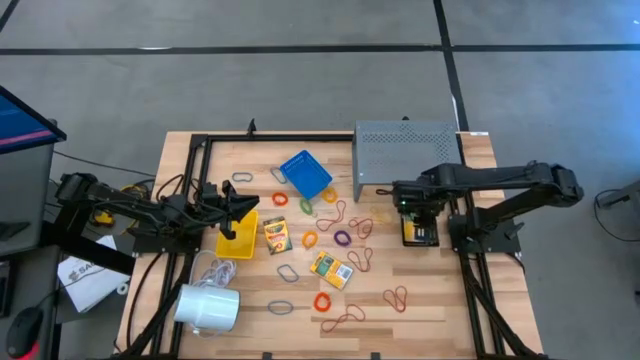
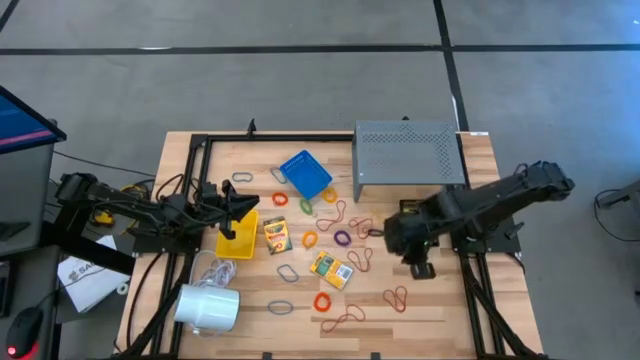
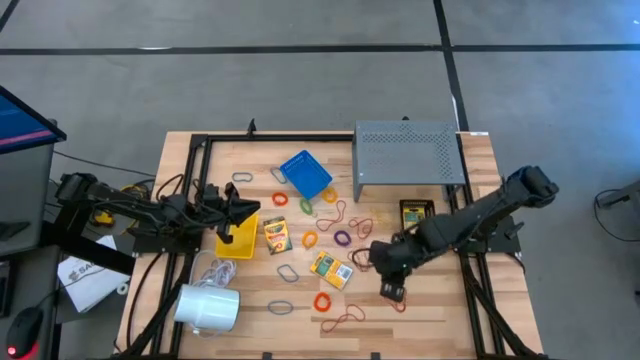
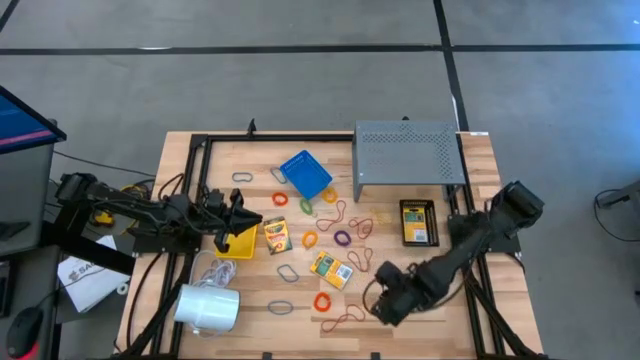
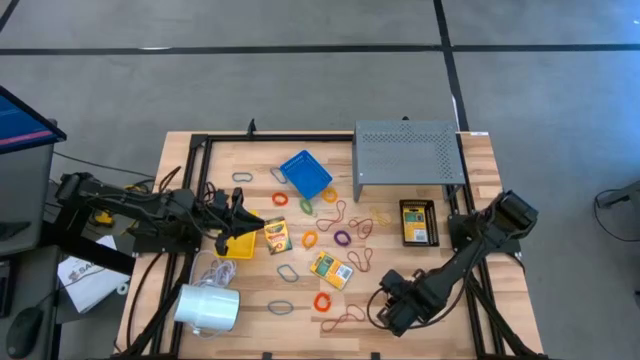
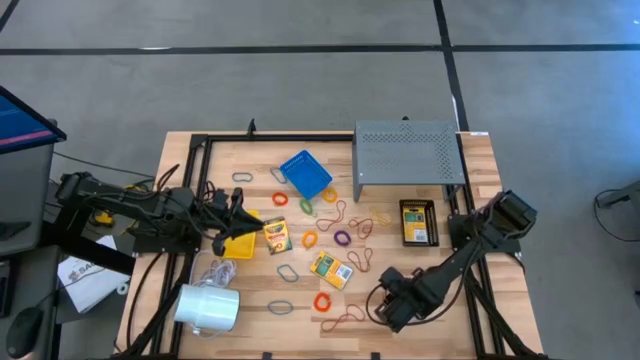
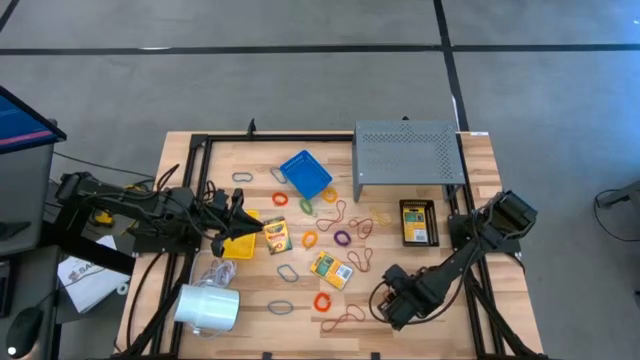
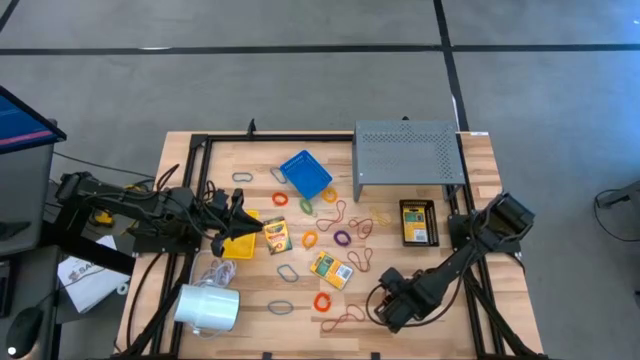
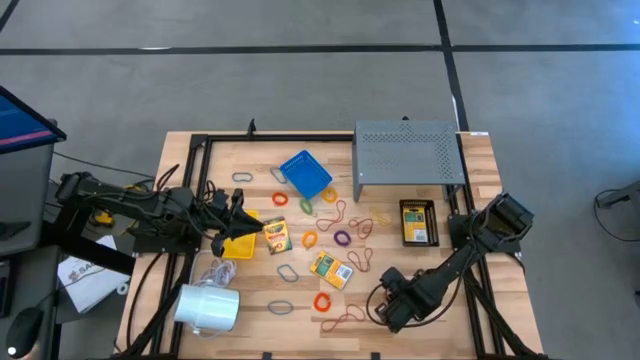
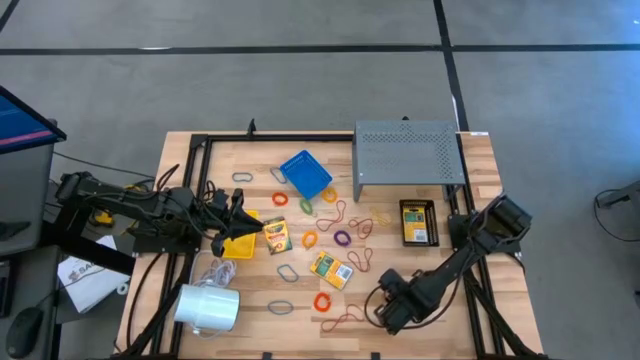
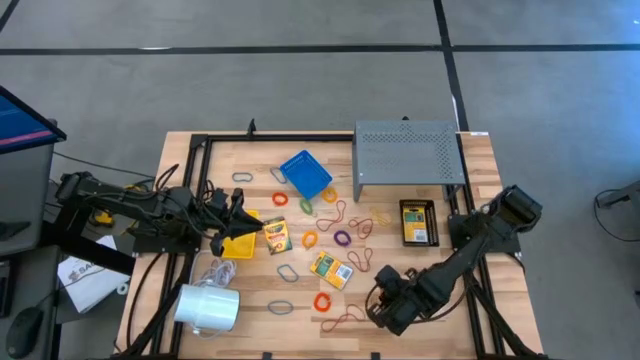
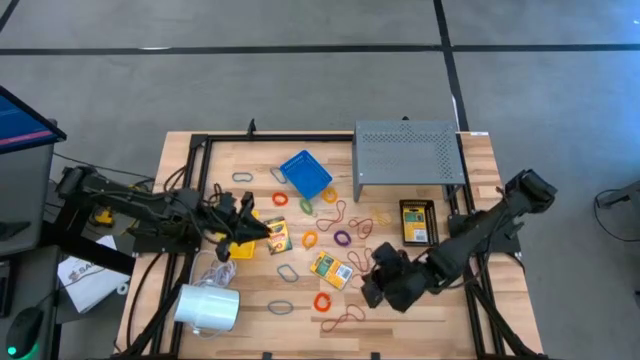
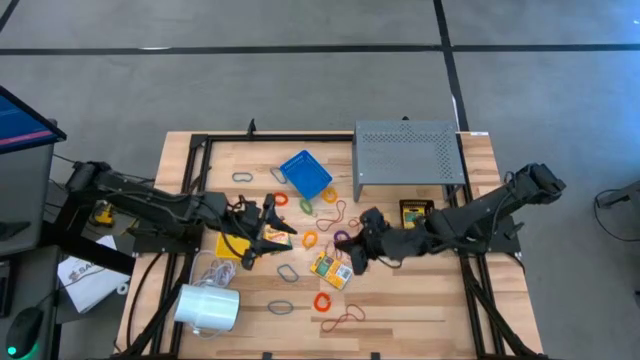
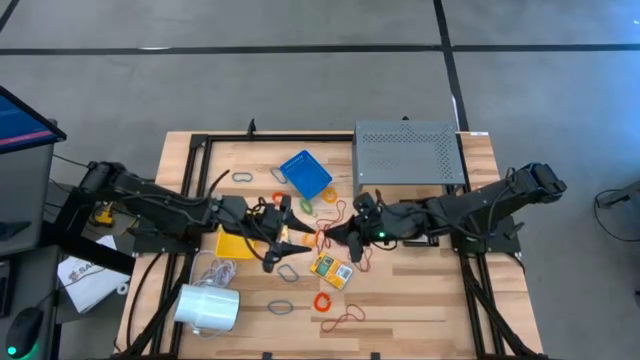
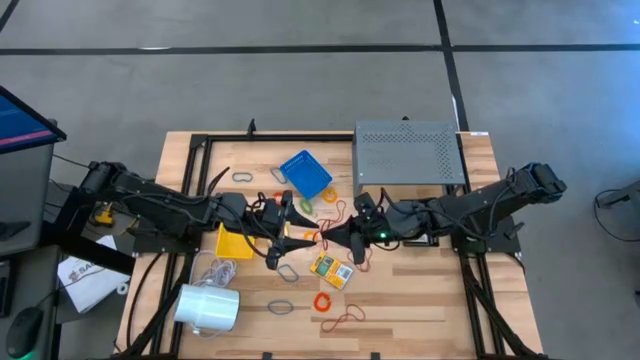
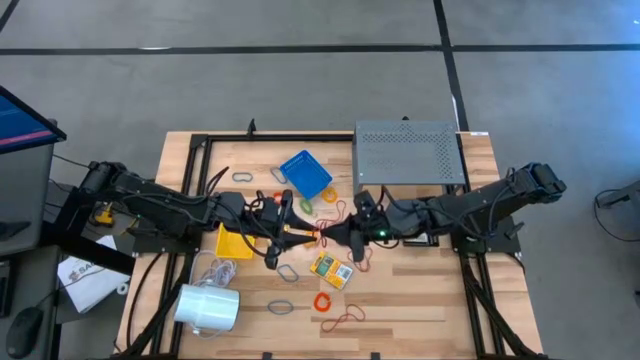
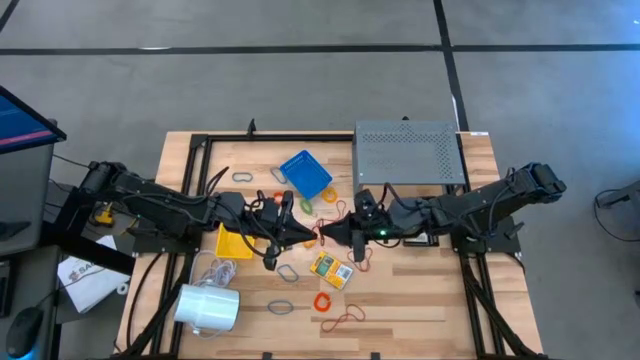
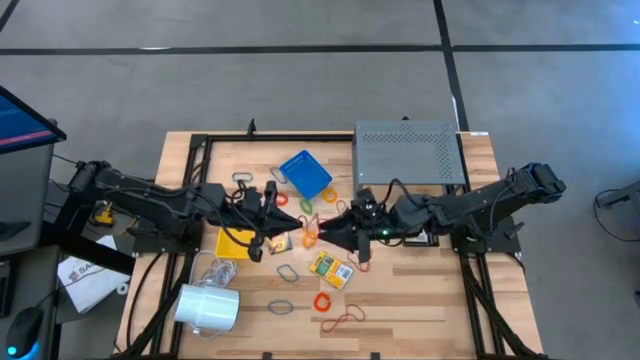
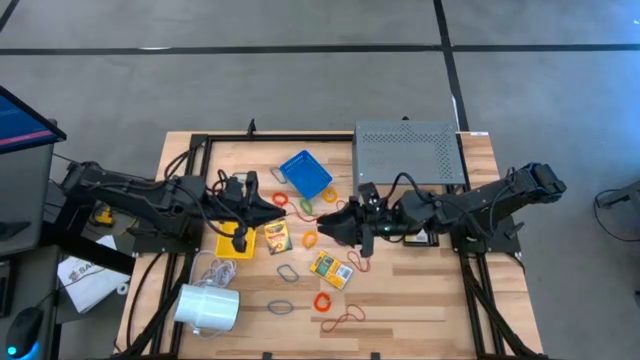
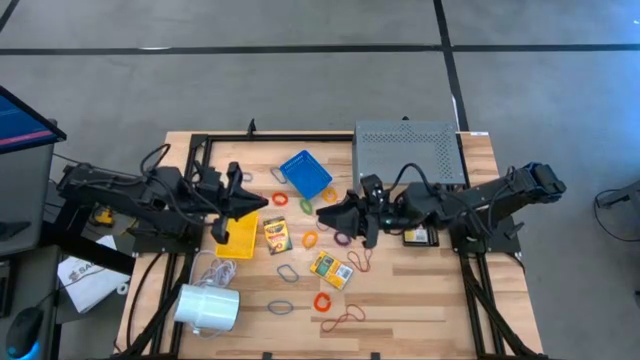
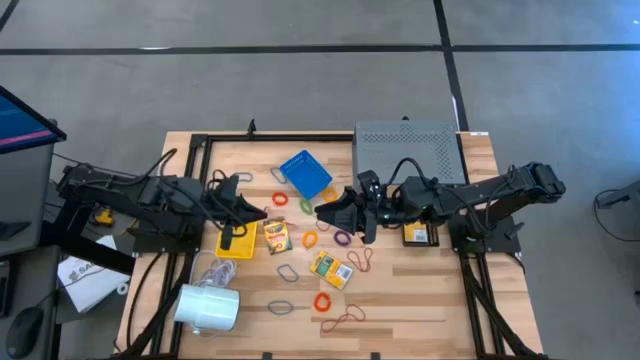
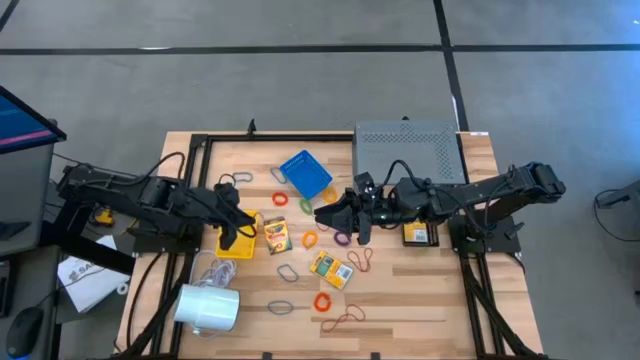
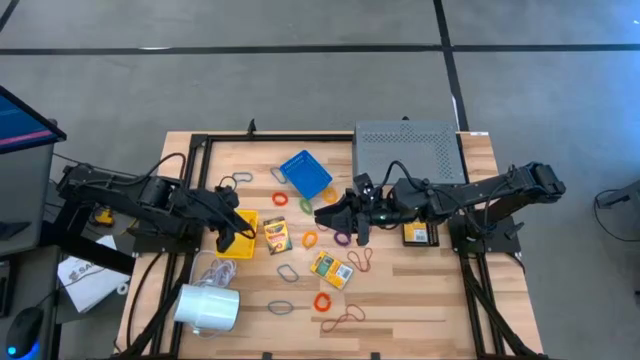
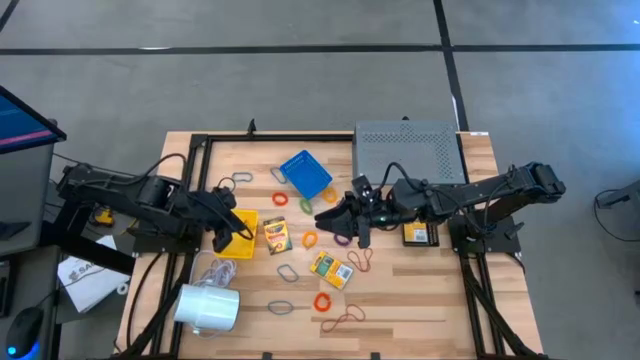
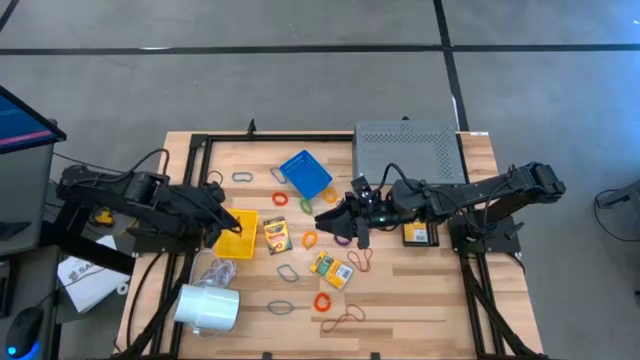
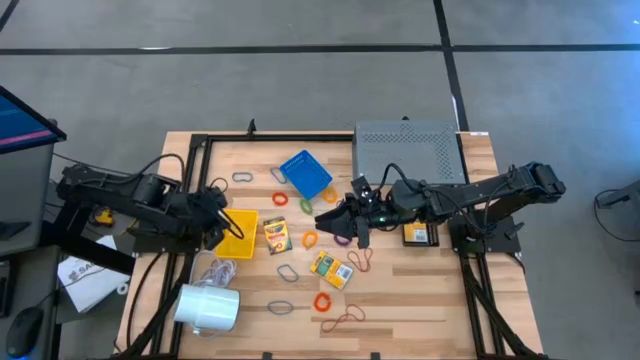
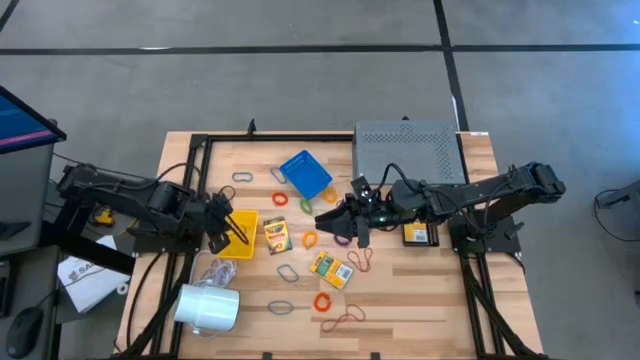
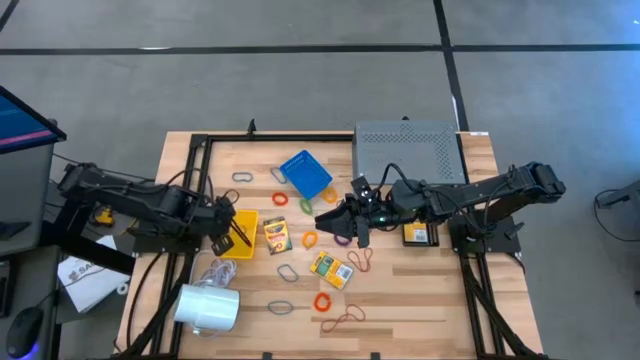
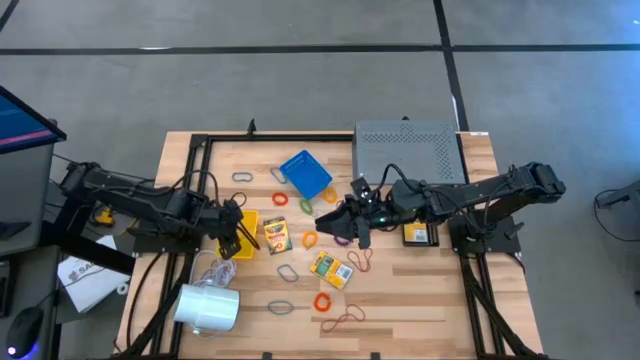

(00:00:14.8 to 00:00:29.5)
Task: Pick & Place Office Desk Supplies
Put the red rubber band into the yellow bin

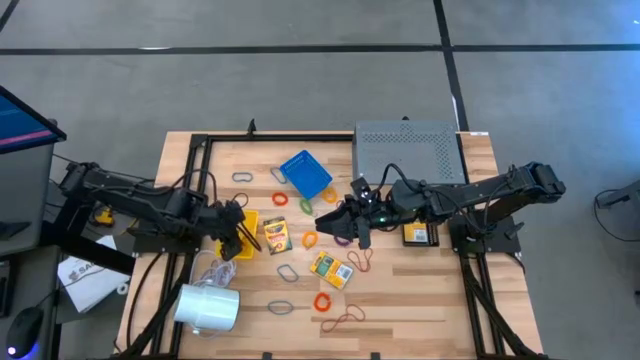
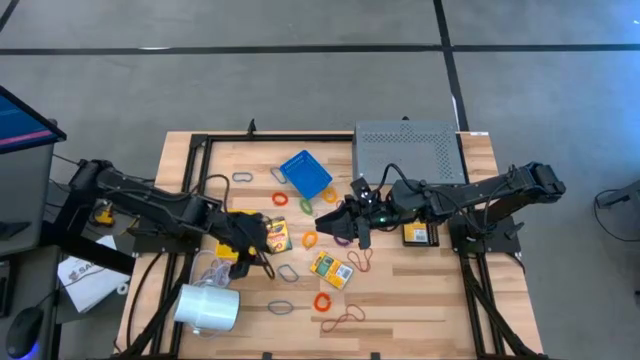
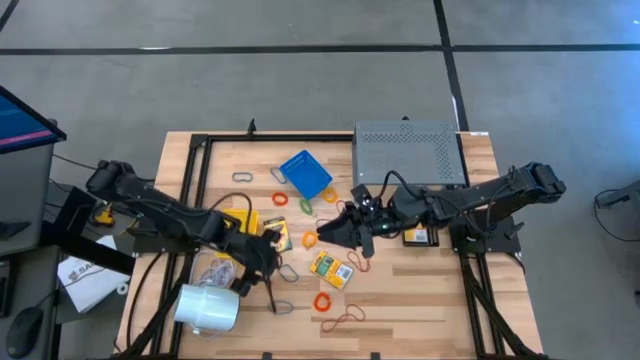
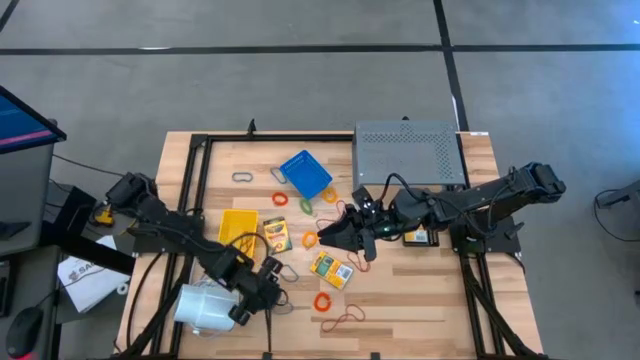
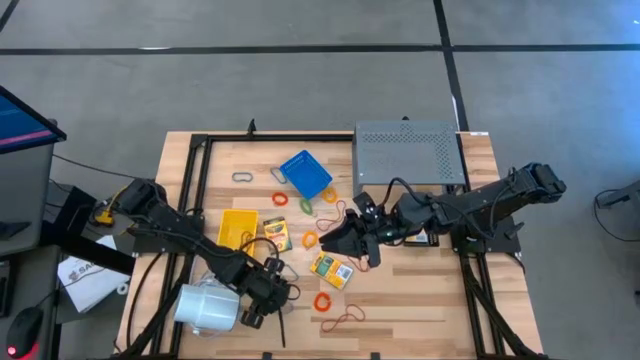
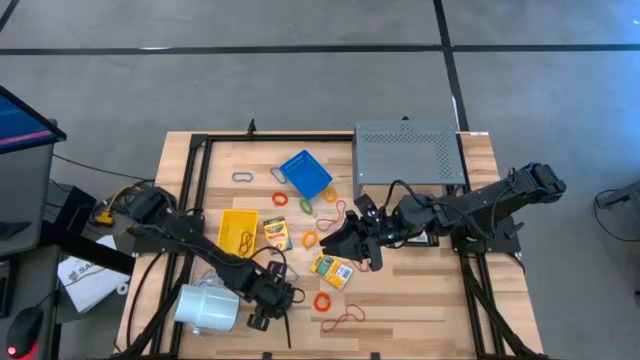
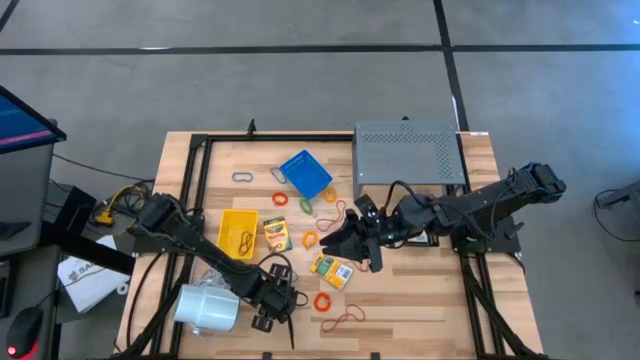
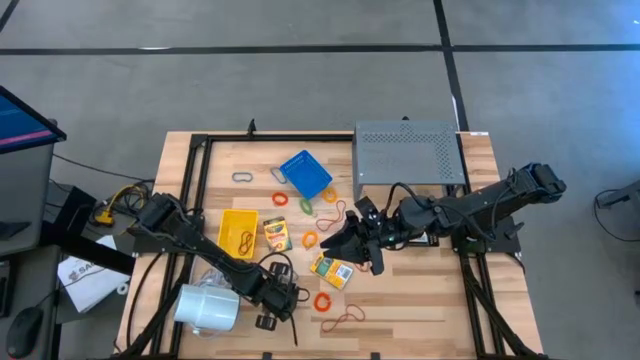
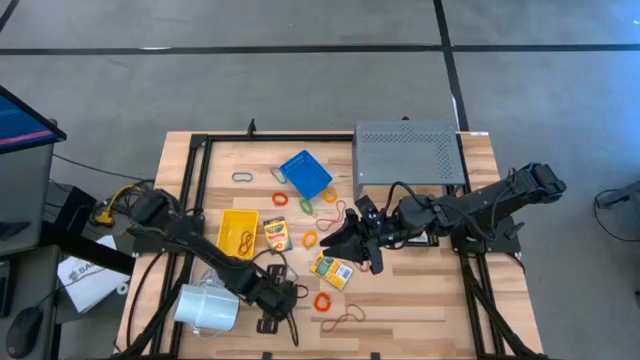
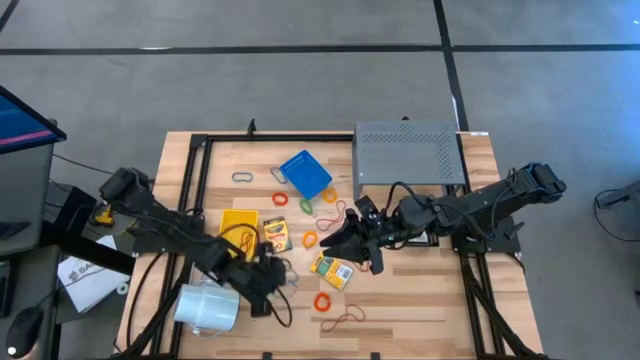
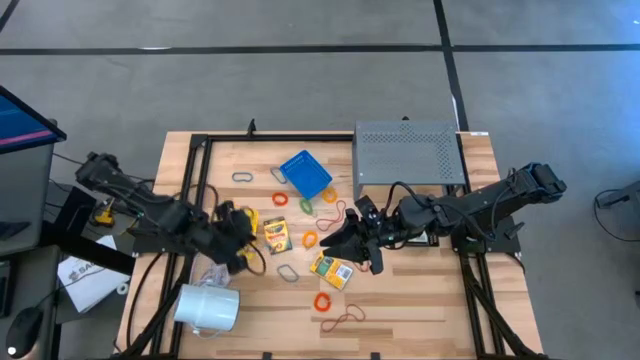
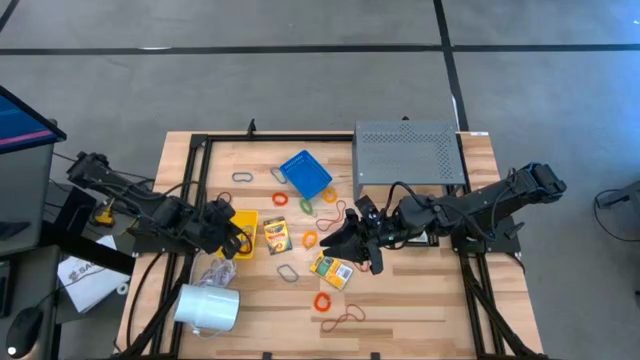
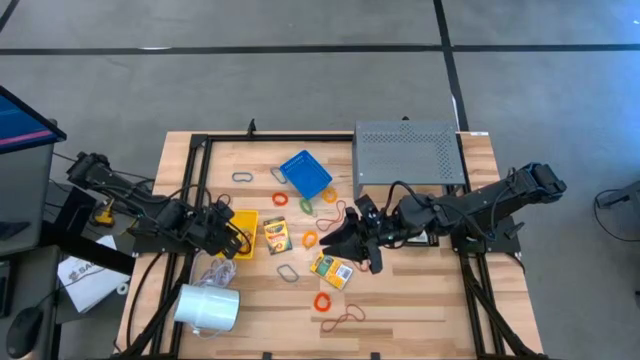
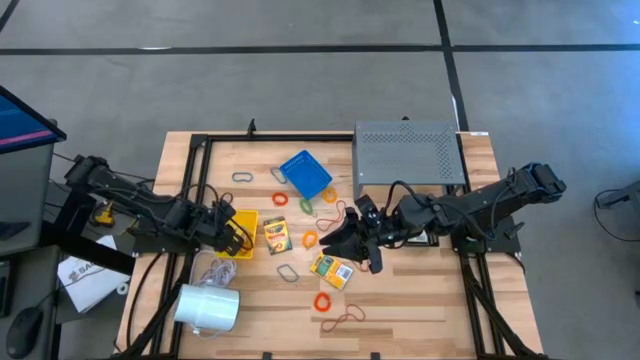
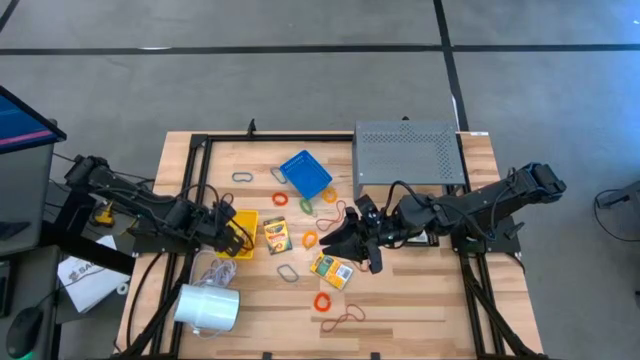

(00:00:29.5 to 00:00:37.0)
Put the blue rubber band into the yellow bin
